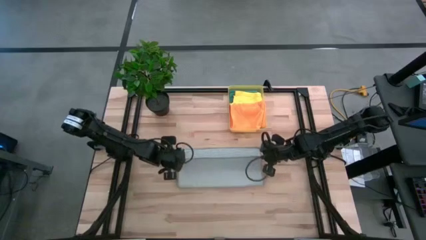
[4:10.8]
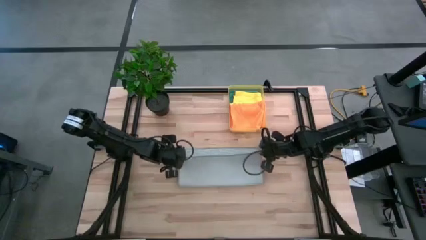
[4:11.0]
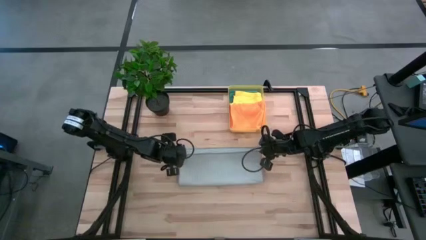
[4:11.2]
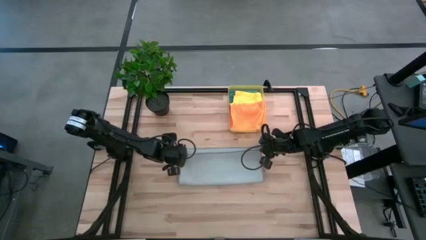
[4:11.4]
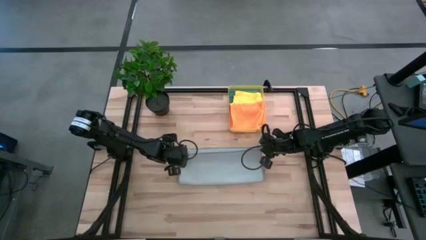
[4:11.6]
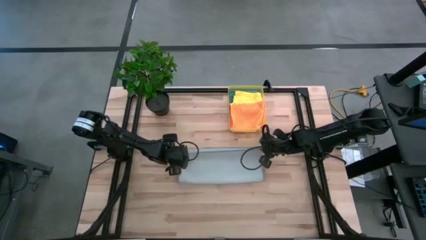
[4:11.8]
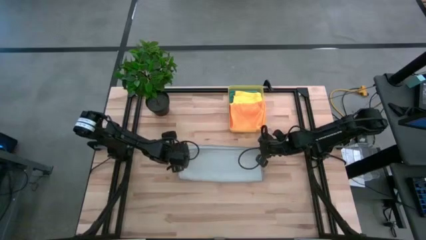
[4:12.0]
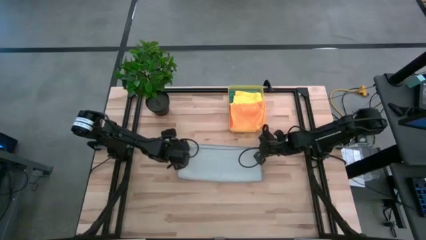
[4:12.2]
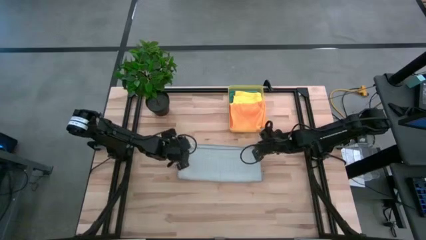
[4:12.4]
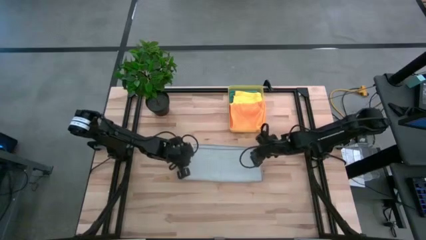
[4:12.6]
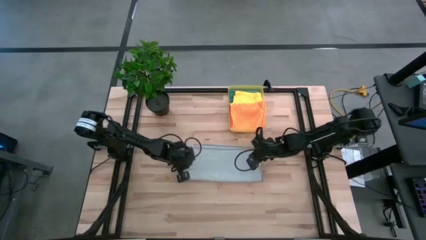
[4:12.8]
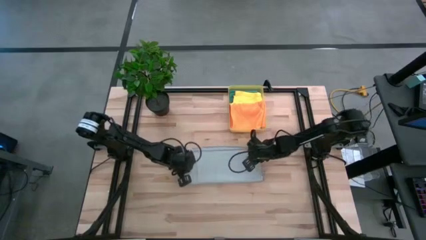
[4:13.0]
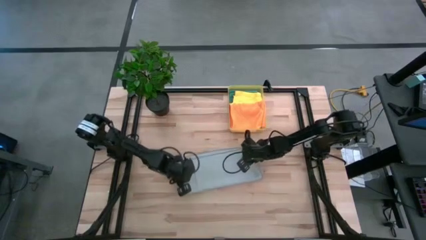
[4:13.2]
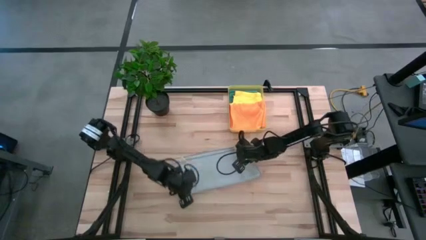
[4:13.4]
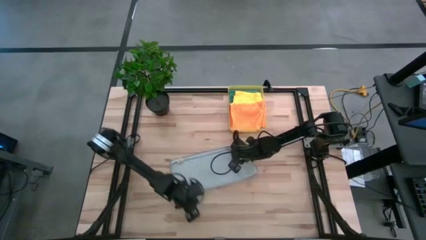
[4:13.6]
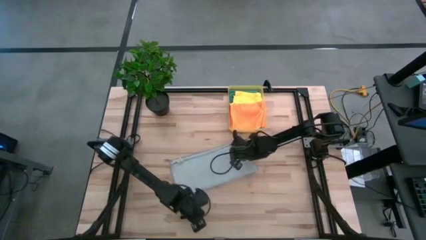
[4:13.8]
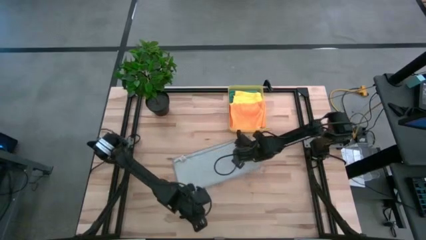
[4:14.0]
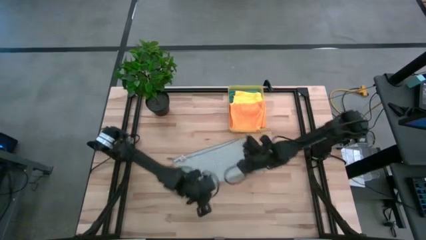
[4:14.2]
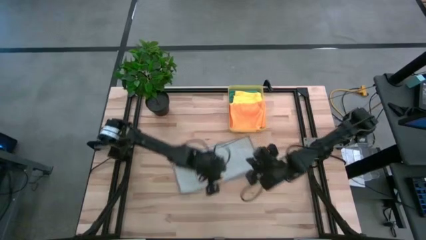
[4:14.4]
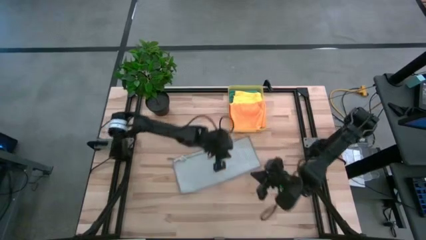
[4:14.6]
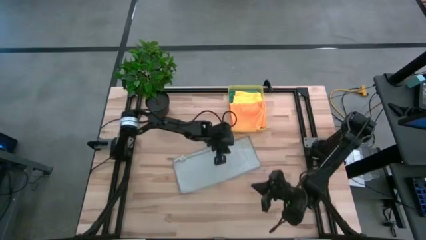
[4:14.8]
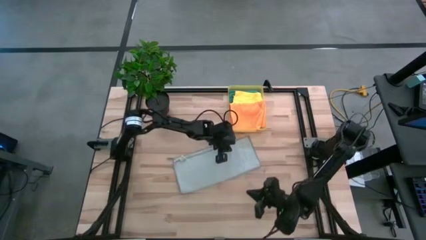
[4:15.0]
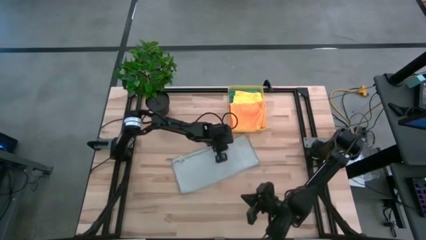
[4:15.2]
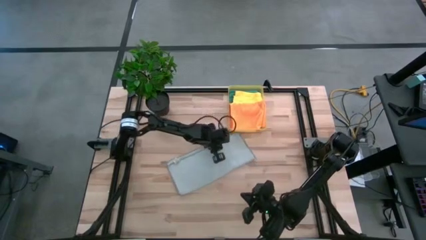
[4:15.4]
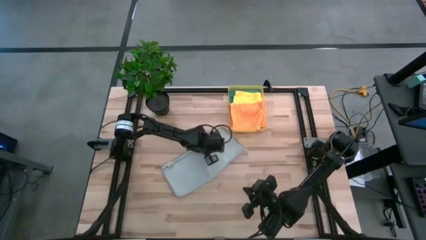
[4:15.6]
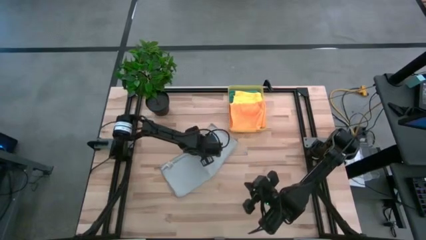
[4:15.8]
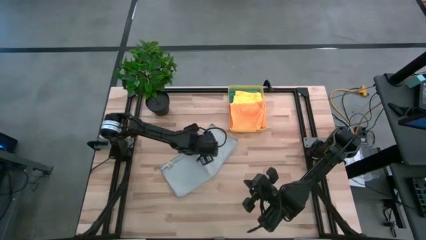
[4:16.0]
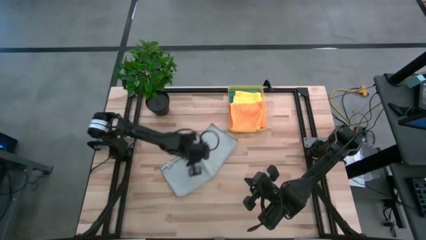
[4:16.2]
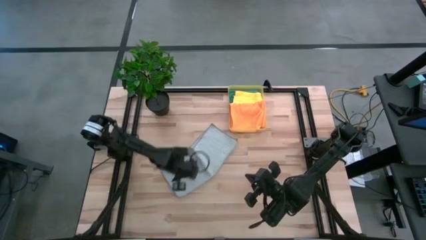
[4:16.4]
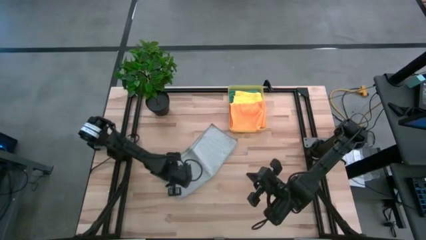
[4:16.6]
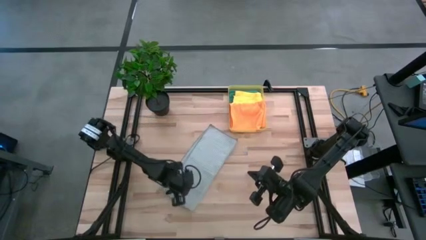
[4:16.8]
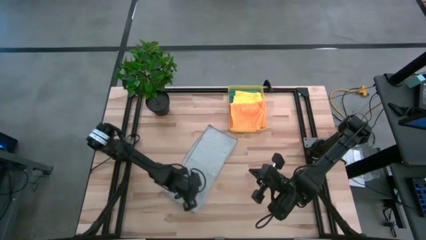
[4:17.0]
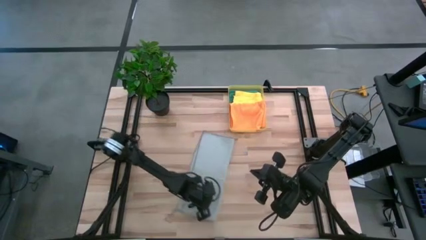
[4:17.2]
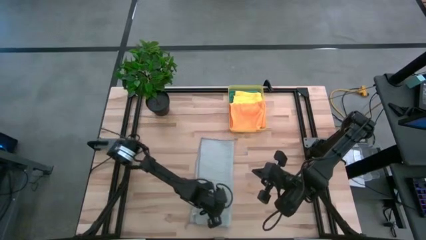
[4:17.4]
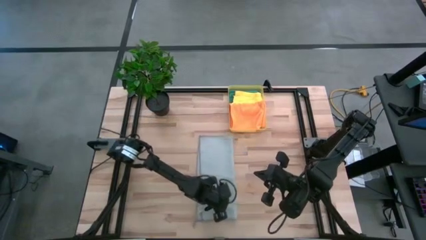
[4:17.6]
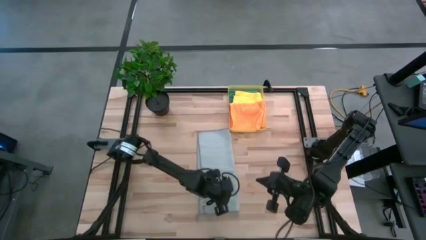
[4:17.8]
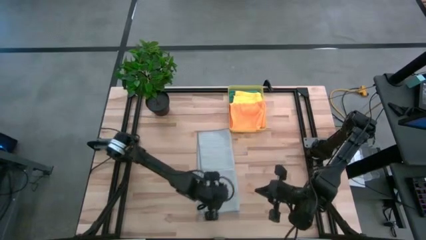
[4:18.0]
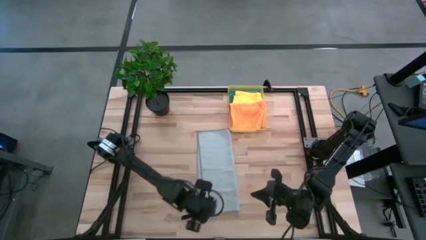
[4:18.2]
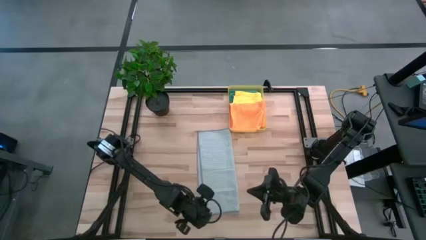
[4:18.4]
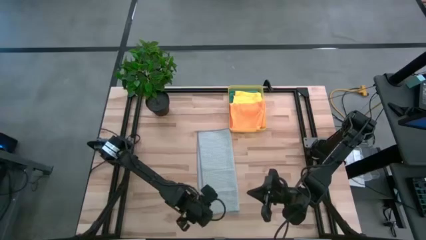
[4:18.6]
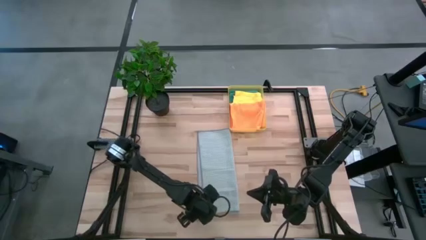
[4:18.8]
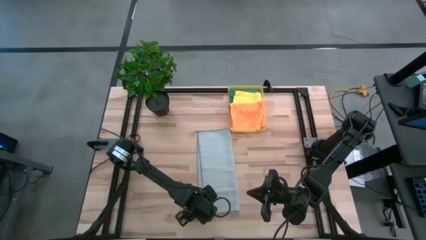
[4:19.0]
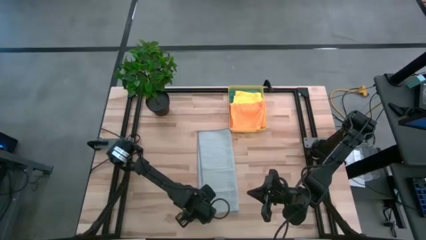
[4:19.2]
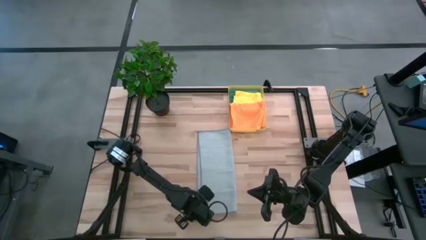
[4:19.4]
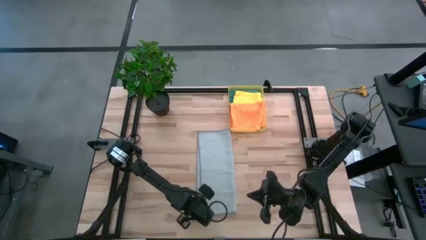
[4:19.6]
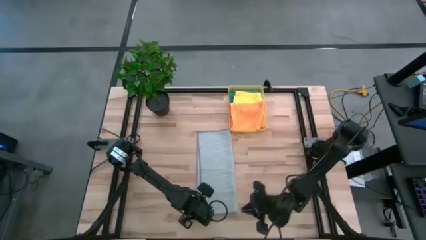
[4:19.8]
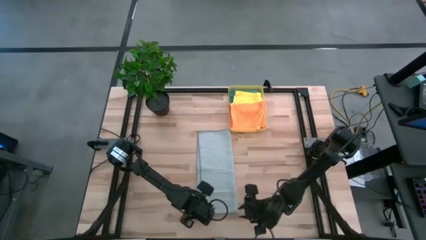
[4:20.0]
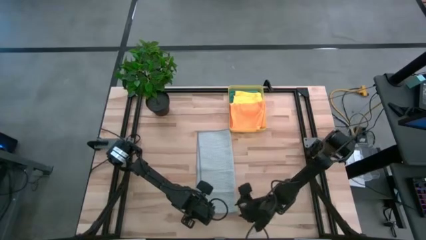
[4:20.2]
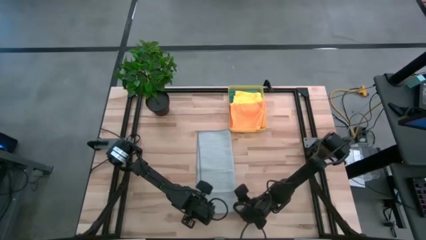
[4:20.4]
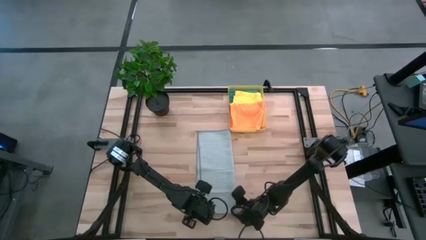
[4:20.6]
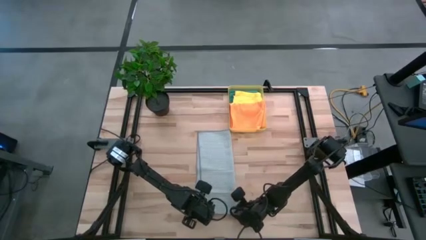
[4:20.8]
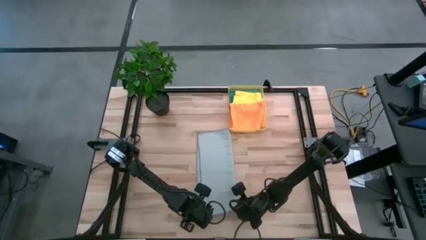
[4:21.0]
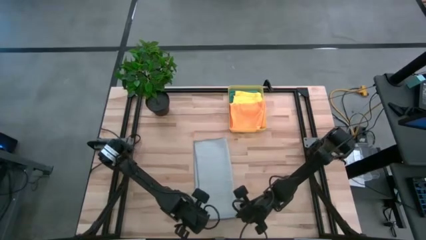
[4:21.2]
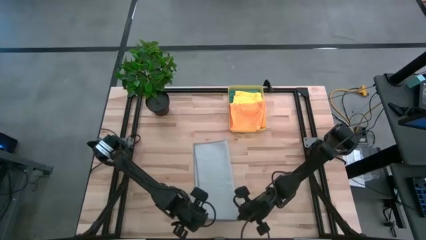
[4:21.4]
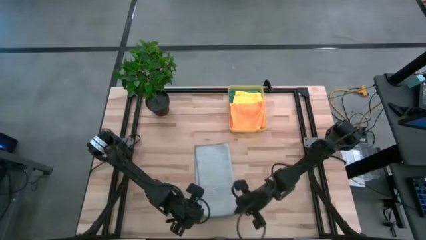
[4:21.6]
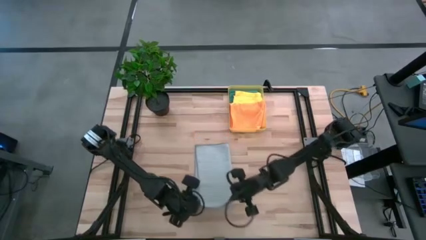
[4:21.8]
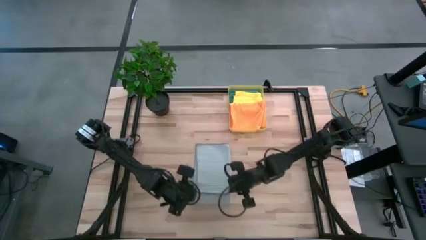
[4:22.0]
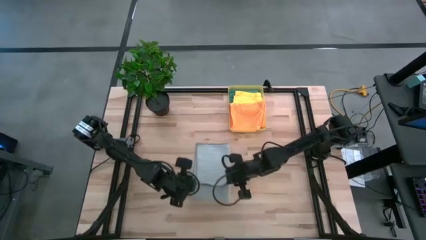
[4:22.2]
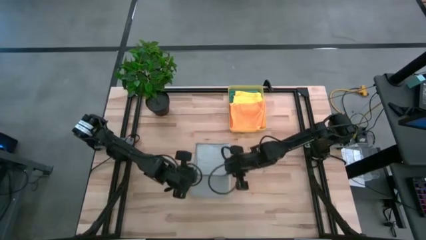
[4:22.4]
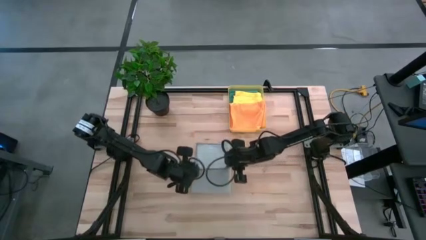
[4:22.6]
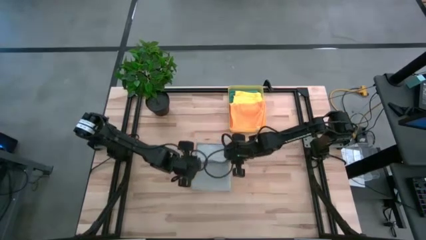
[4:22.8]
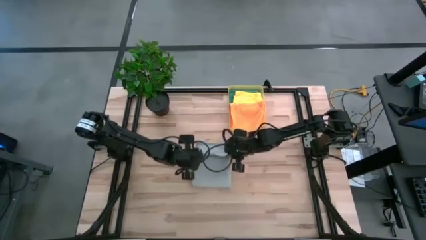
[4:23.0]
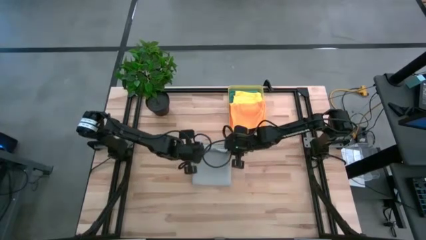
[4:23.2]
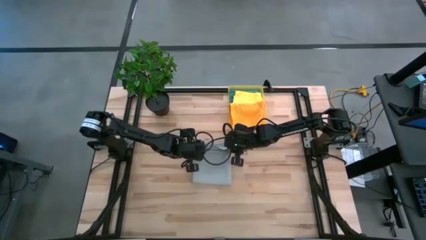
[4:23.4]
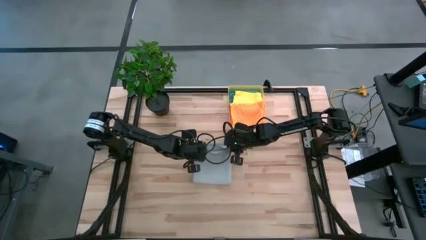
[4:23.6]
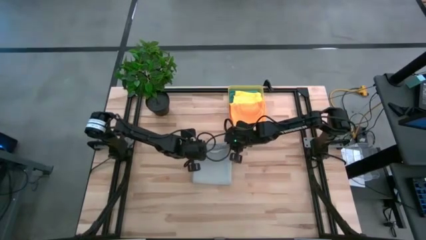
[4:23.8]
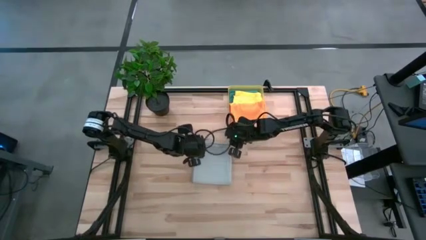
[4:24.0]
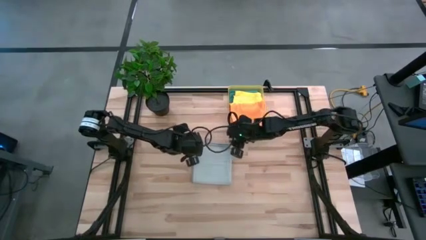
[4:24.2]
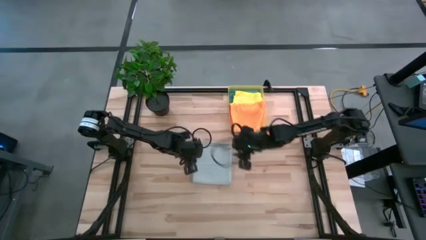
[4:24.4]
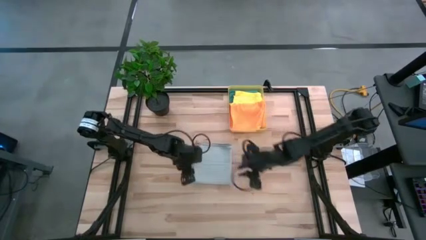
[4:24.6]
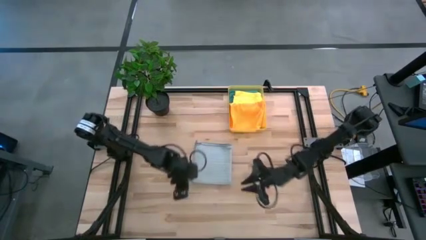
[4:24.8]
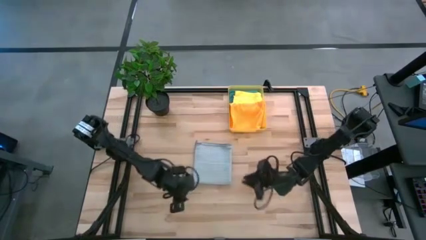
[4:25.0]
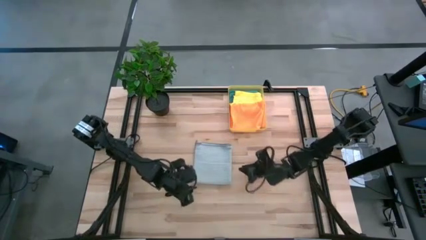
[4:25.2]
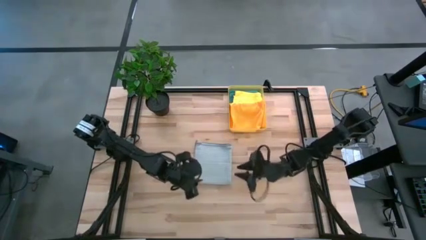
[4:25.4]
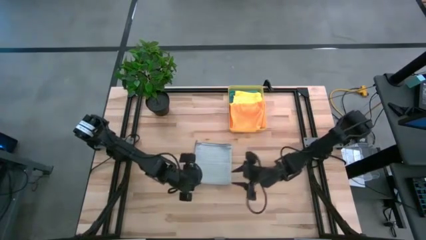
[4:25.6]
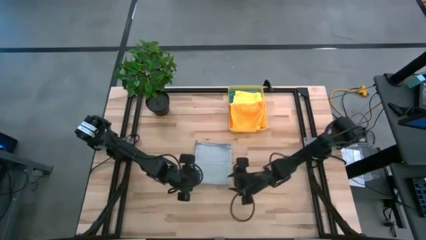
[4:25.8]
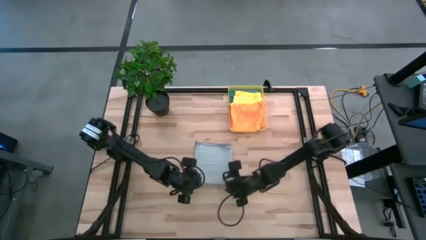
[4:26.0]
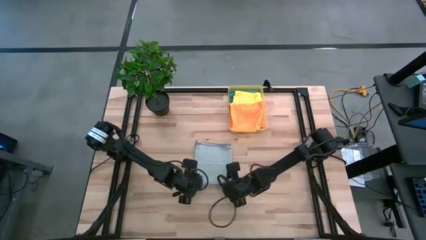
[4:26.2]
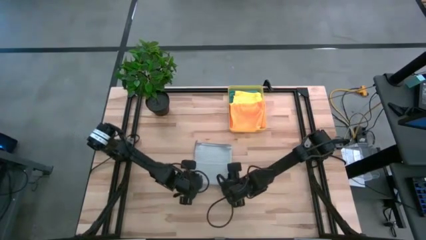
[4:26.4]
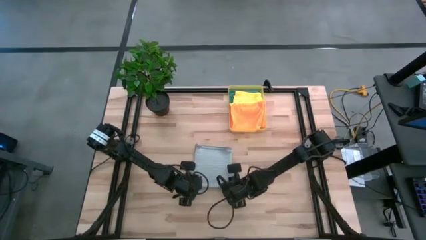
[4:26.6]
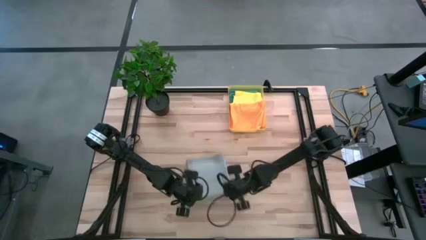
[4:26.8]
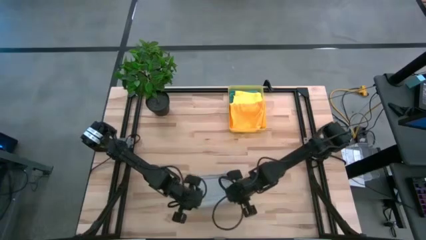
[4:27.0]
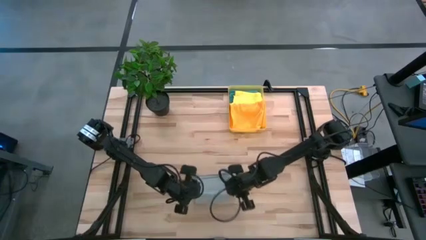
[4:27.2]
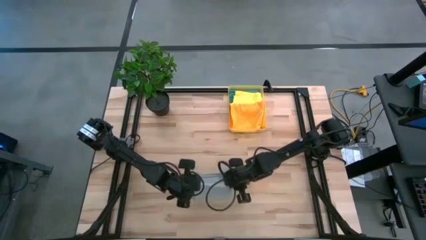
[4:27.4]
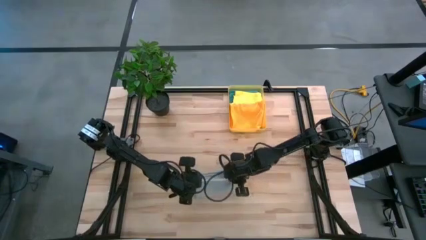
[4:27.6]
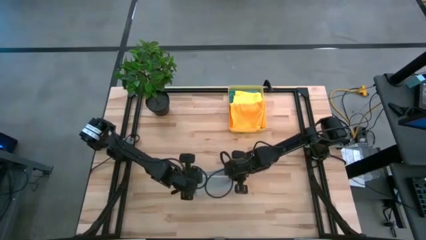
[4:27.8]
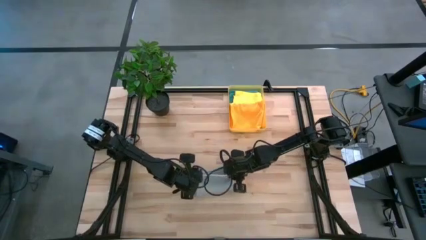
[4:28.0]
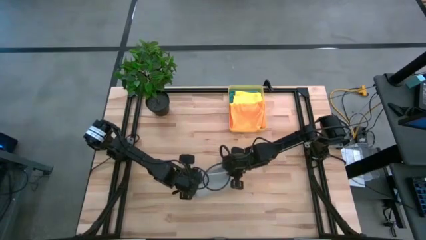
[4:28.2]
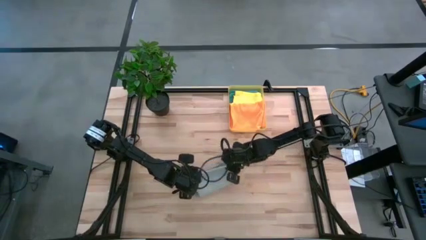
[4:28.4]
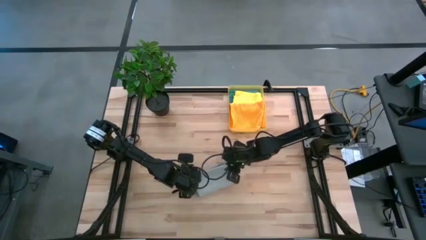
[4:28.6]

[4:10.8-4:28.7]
Task: Fold microfiber towels
Fold the gray microfiber towel
